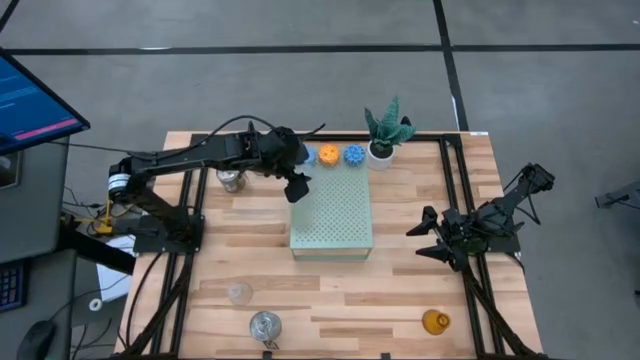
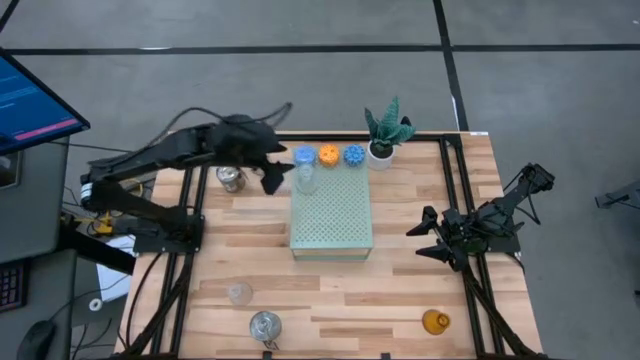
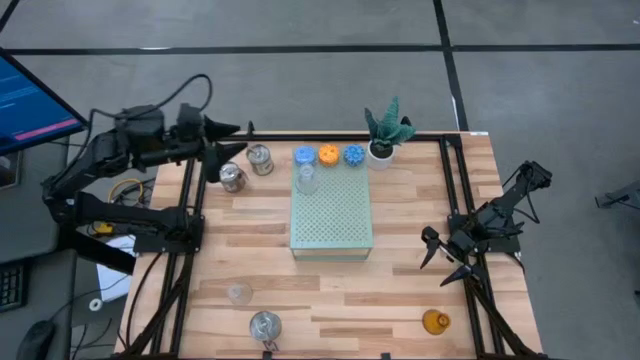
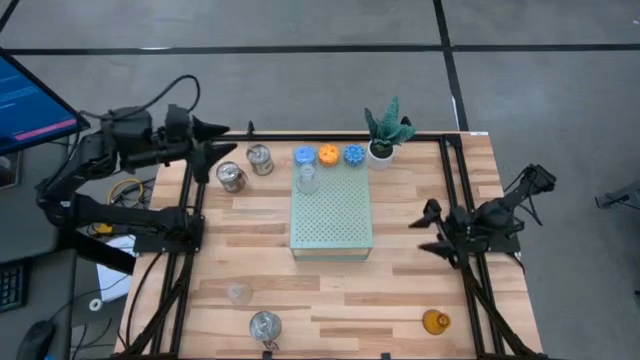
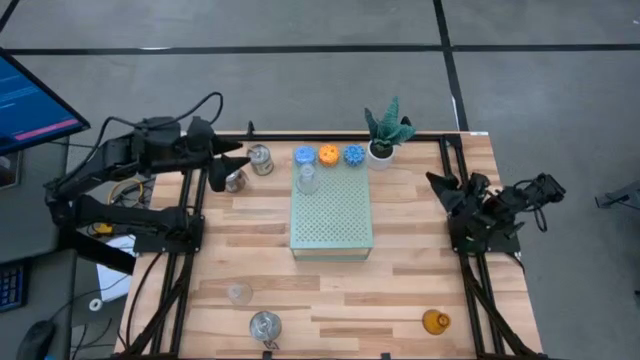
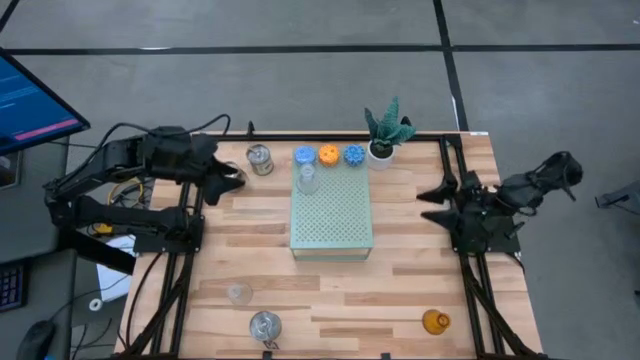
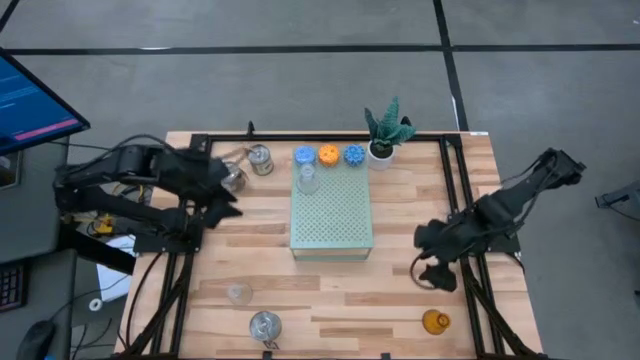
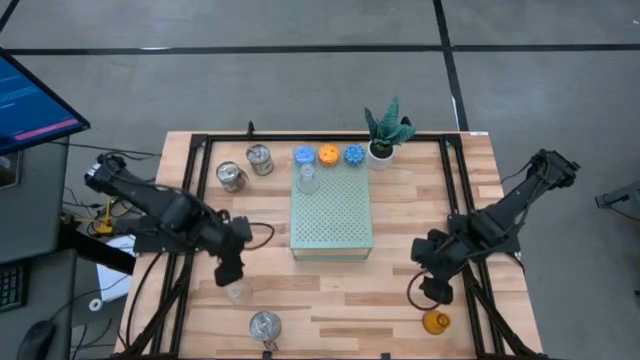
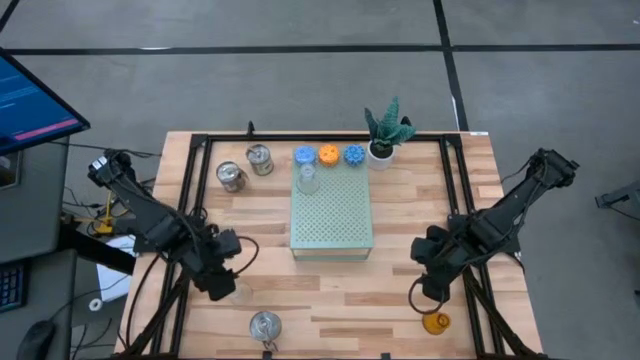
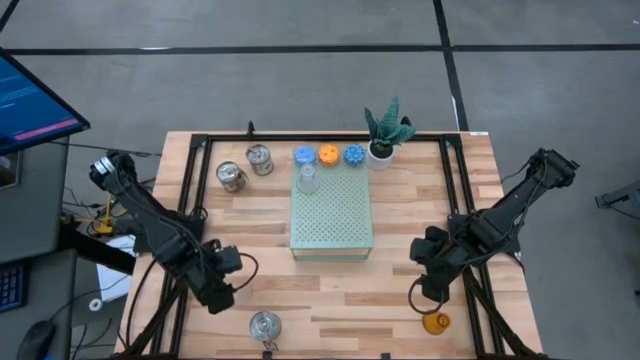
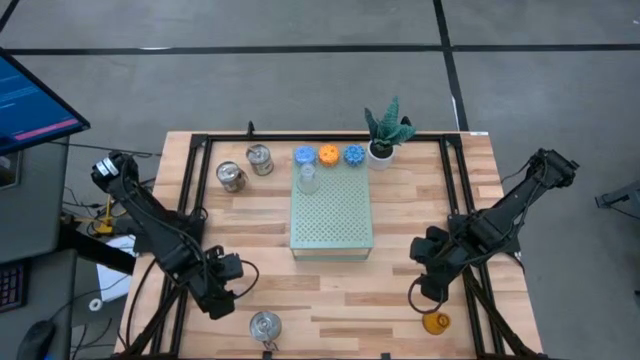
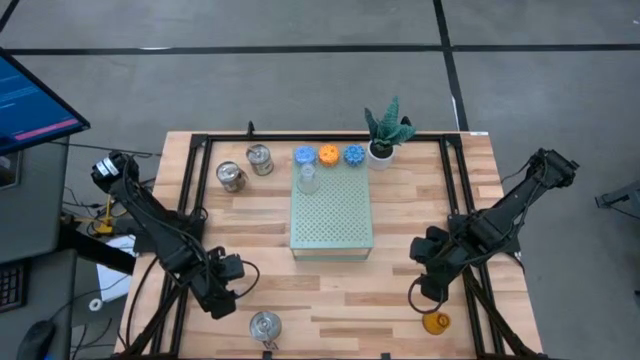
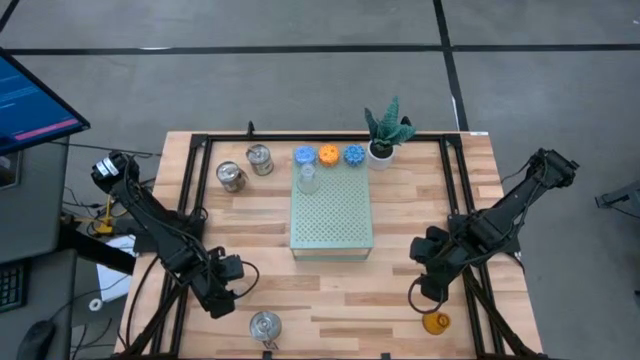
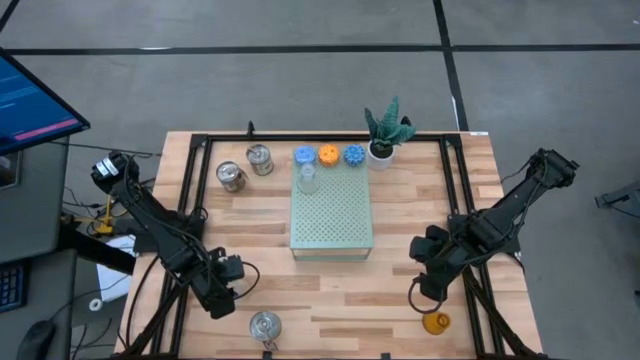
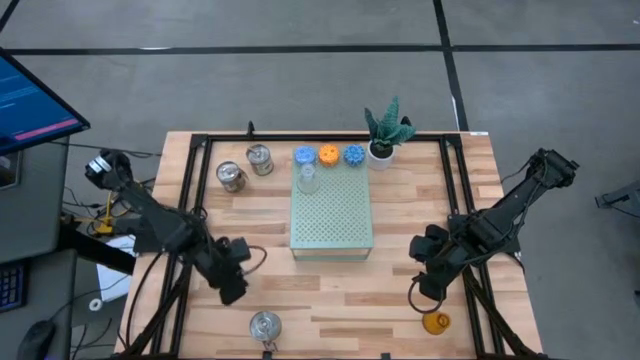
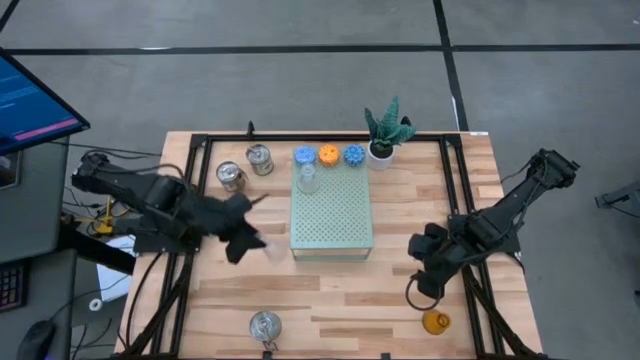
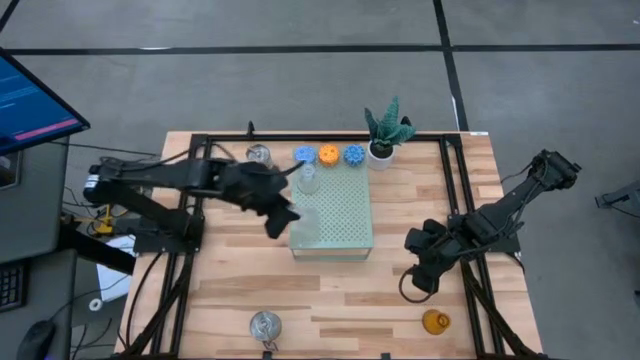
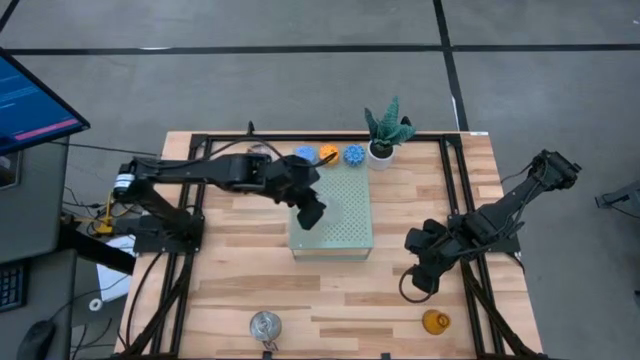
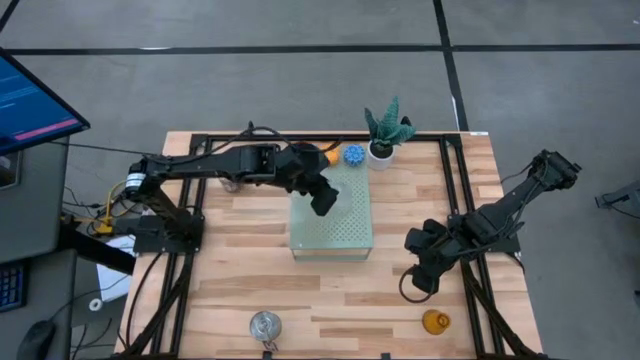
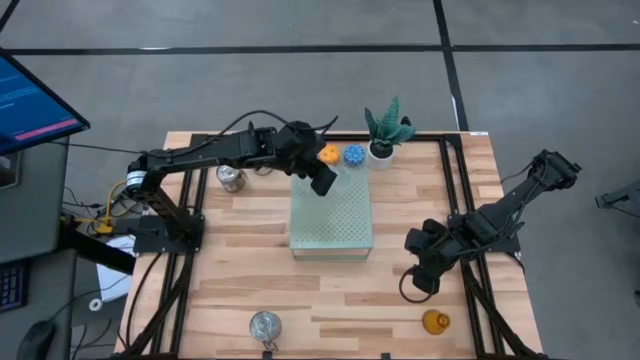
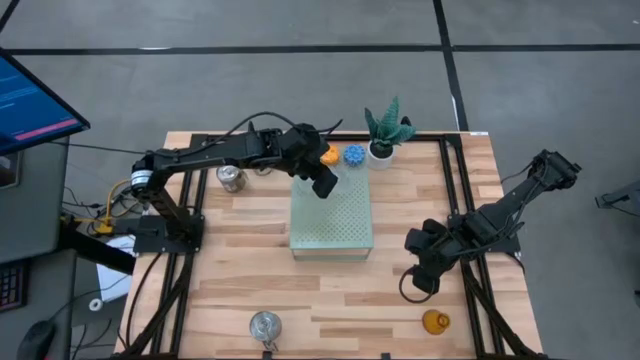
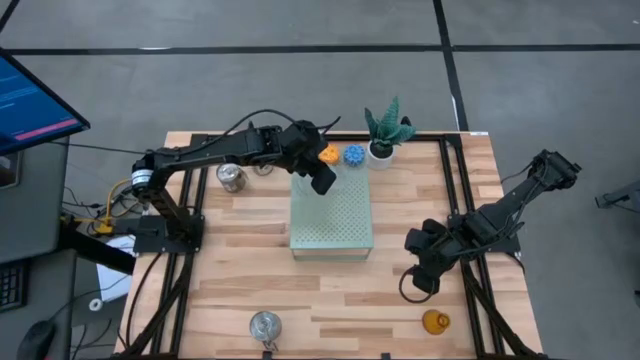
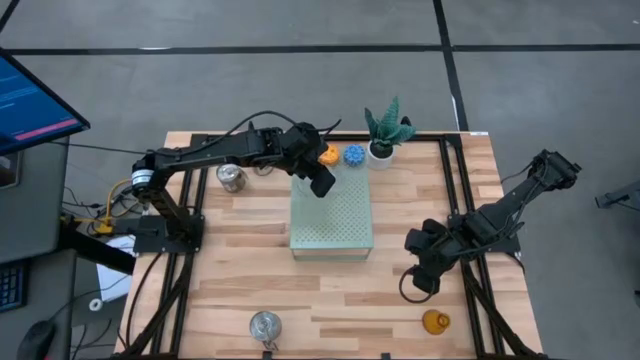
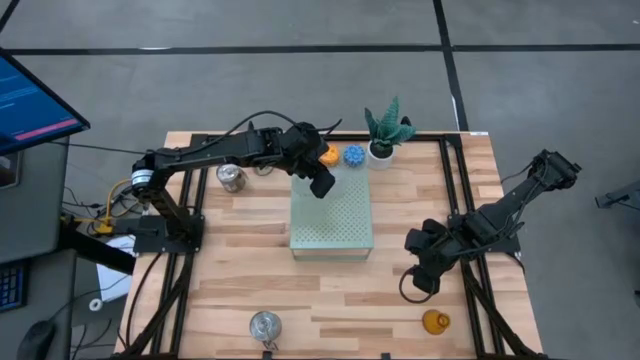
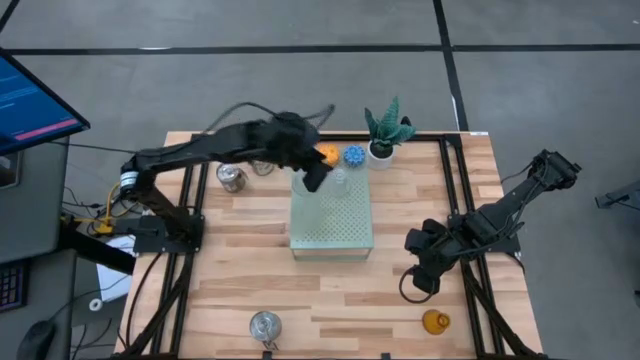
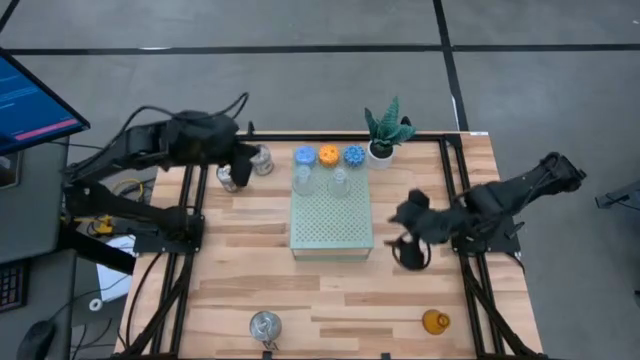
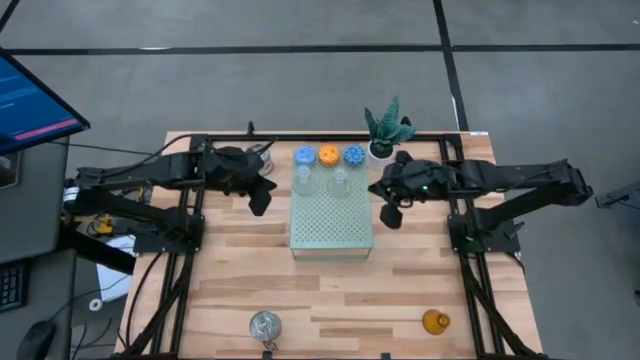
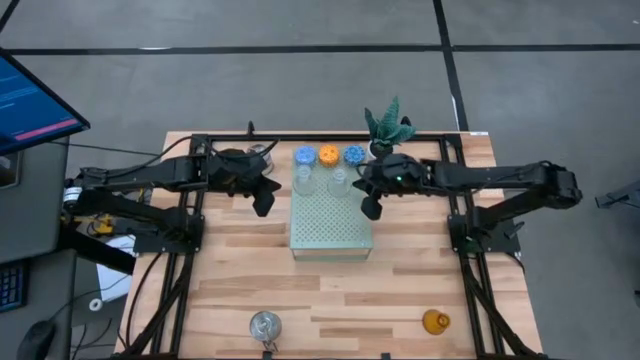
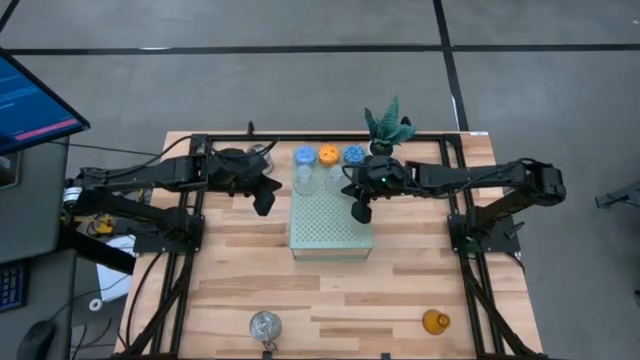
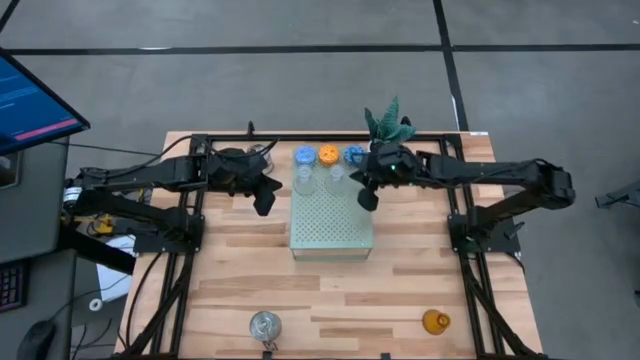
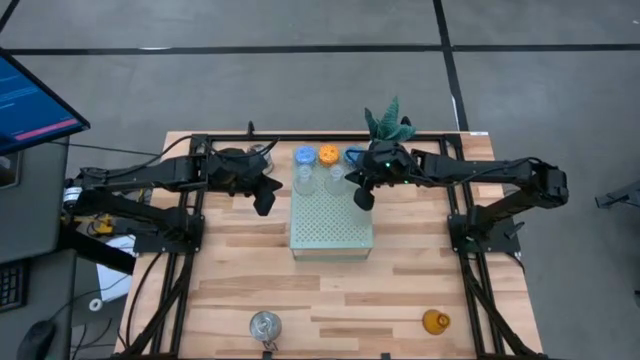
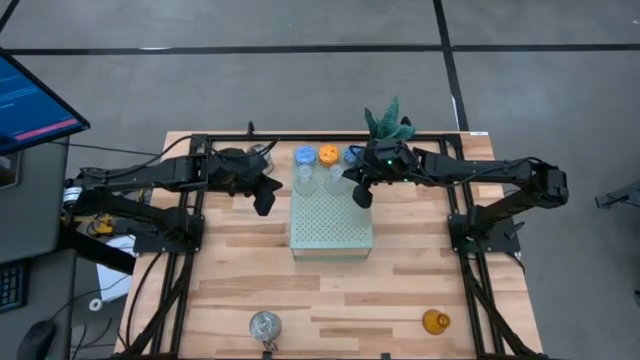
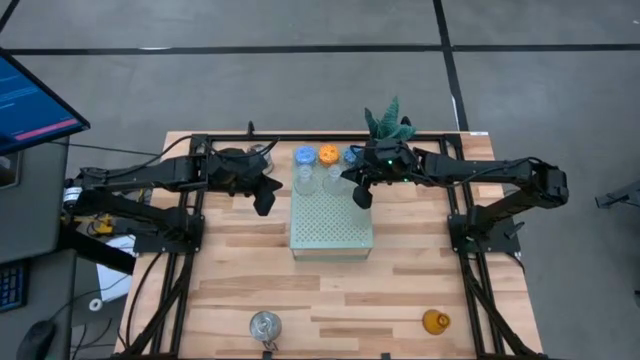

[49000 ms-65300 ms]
Task: Stock candles and holders on shelf
Put the transparent candle holder on the shelf aligned with the other transparent candle holder

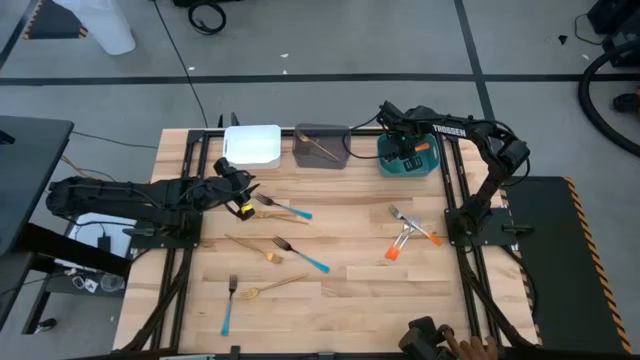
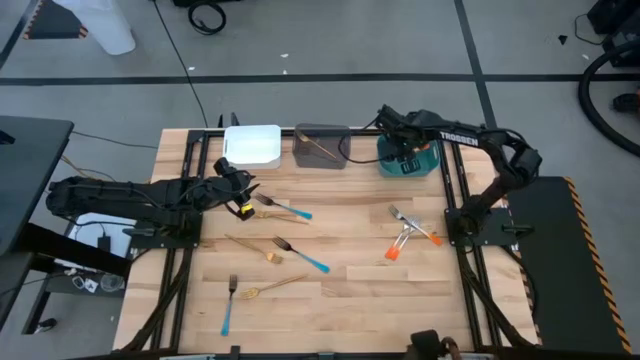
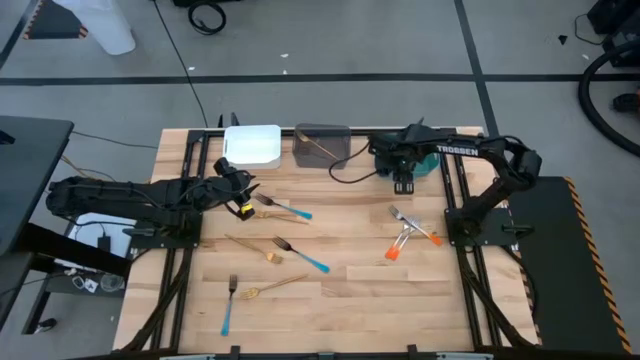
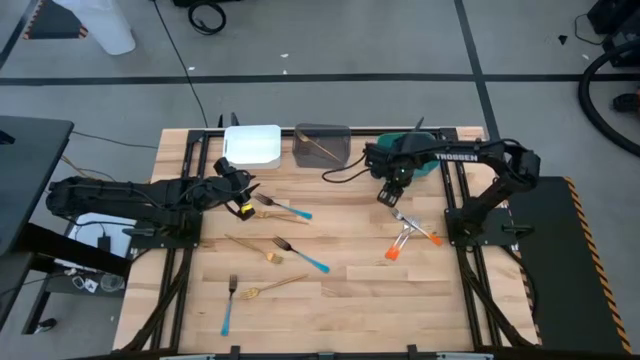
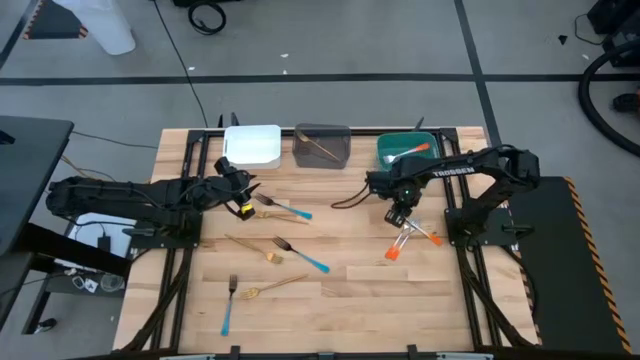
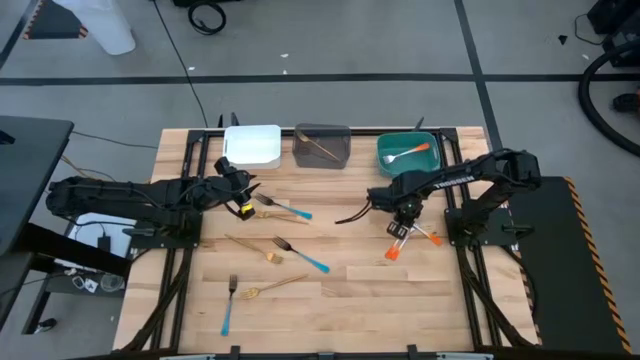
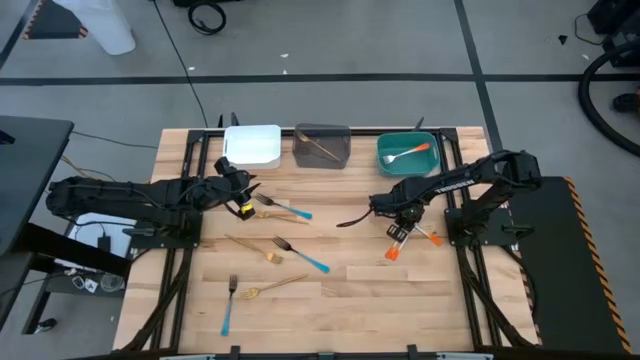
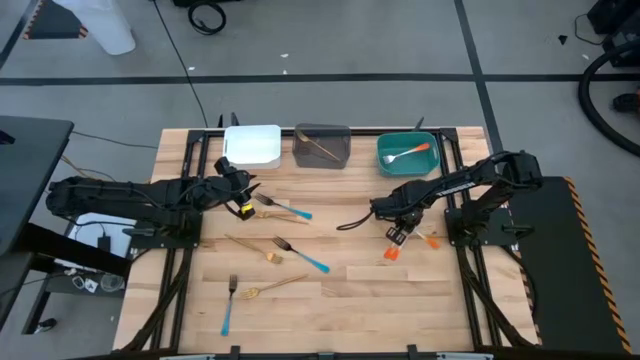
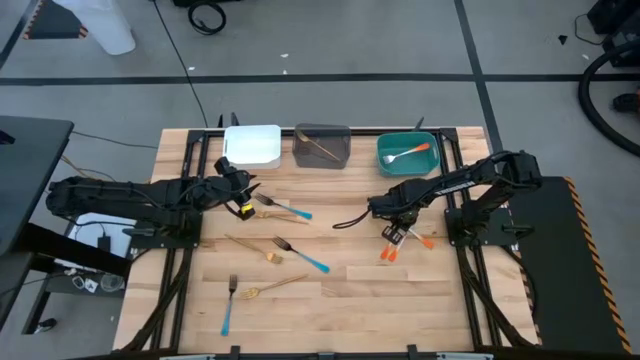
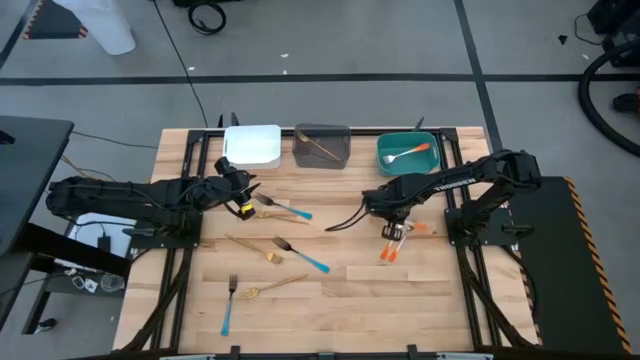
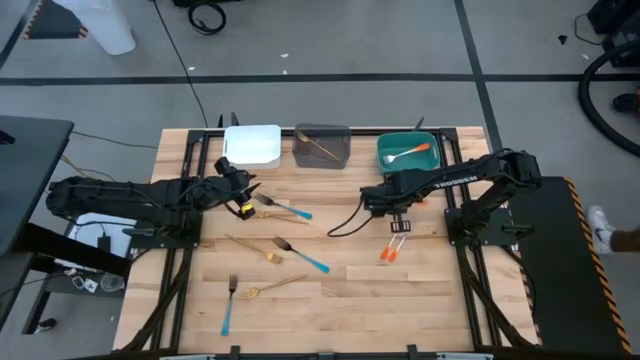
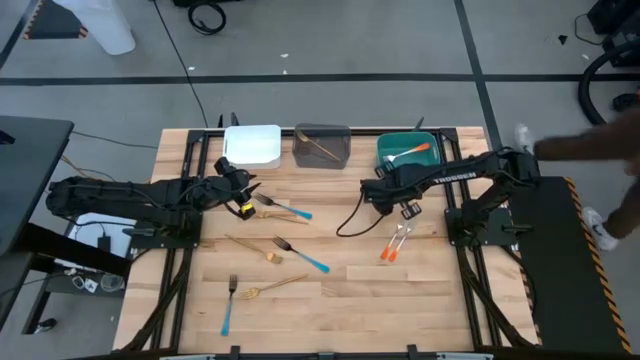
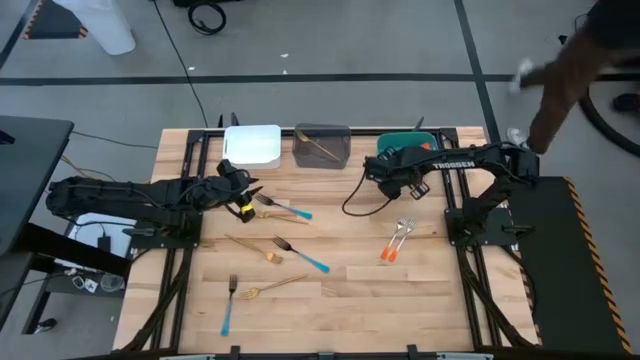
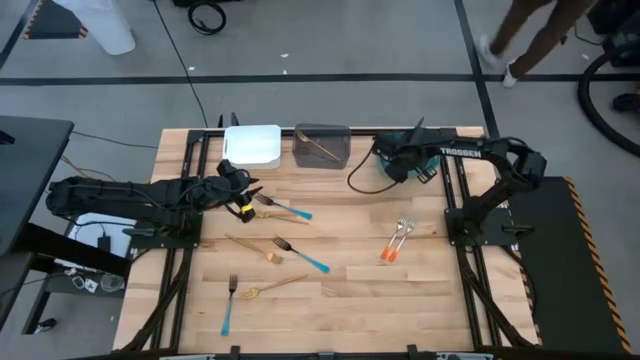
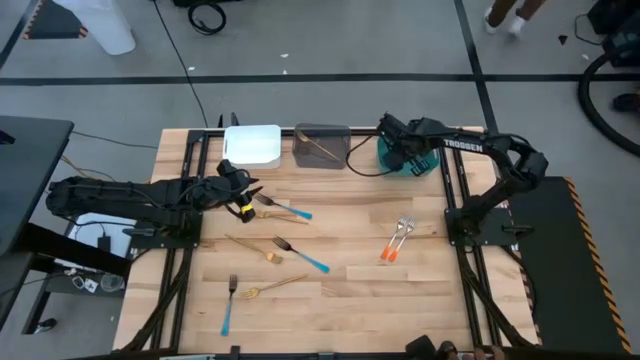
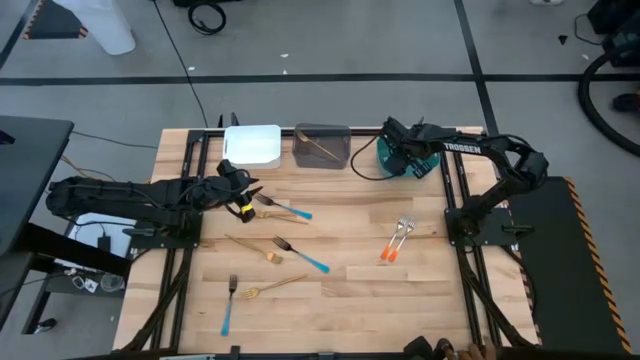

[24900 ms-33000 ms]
Task: Sort silverware by color (type)
Put the top orange fork into the green bin
